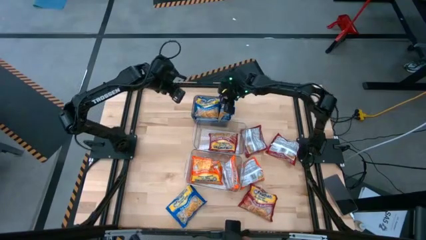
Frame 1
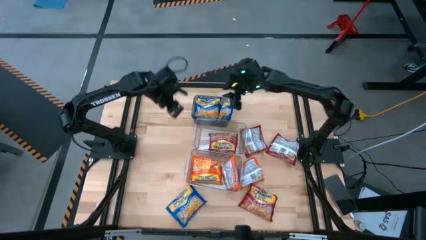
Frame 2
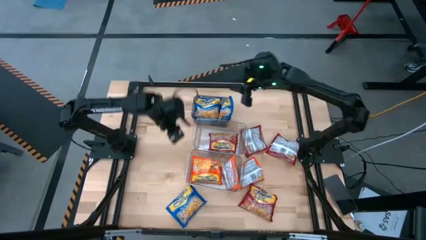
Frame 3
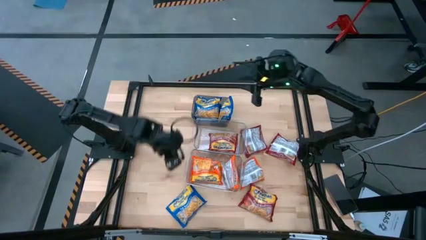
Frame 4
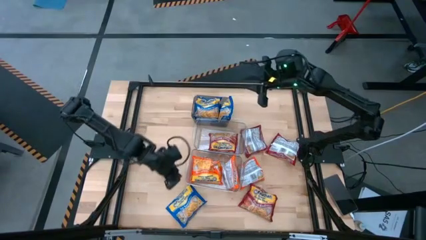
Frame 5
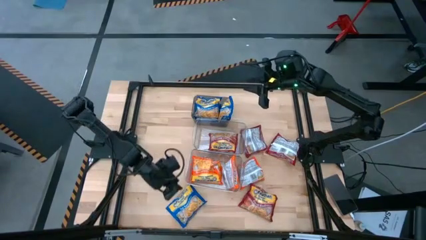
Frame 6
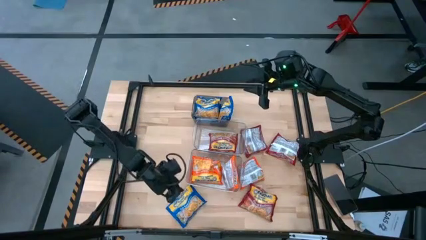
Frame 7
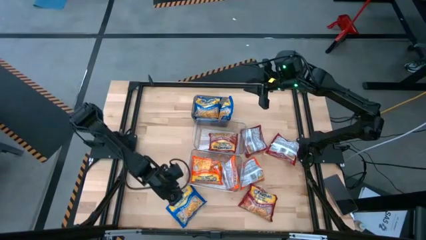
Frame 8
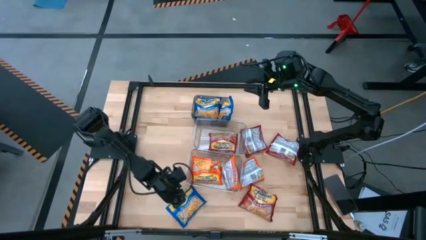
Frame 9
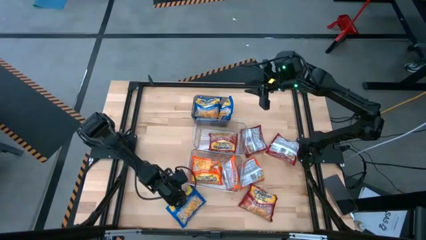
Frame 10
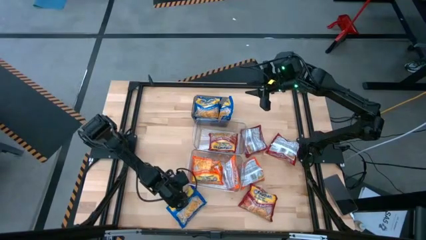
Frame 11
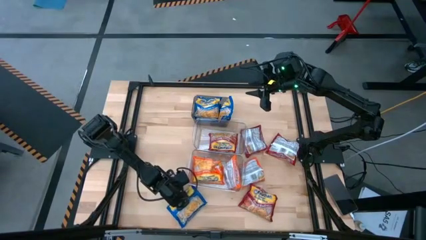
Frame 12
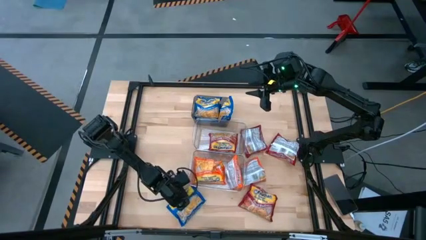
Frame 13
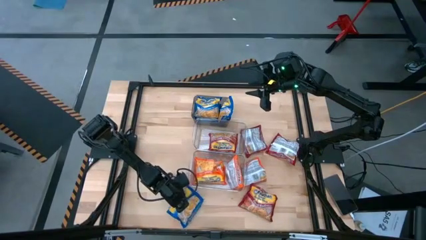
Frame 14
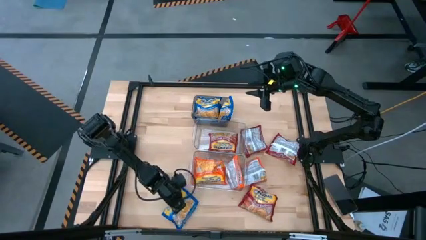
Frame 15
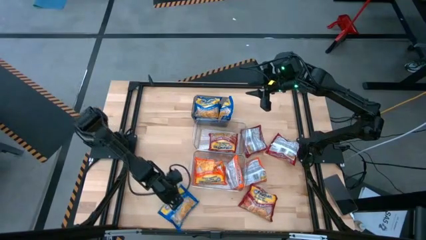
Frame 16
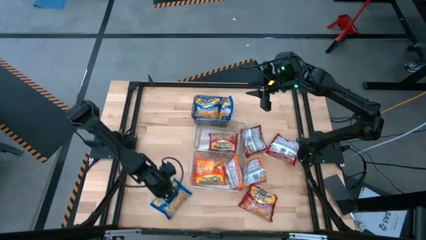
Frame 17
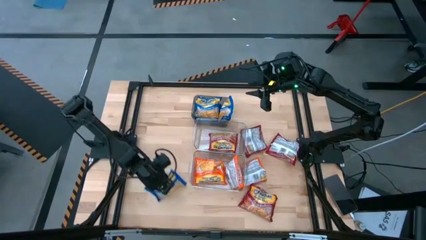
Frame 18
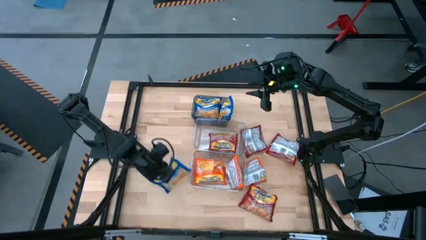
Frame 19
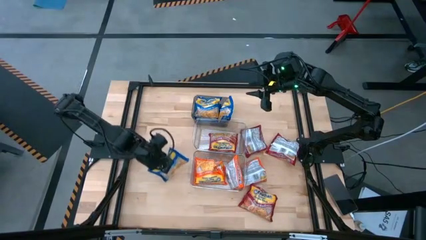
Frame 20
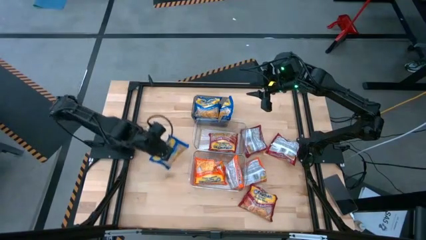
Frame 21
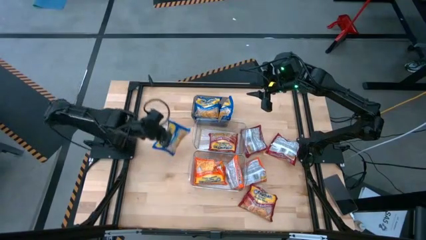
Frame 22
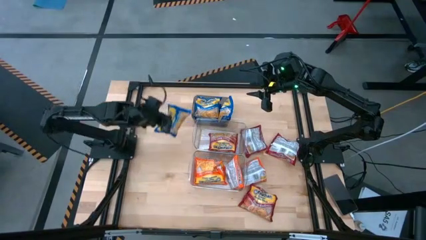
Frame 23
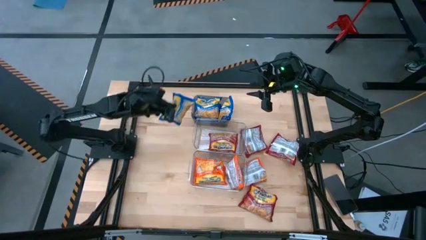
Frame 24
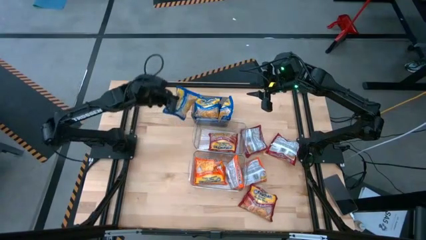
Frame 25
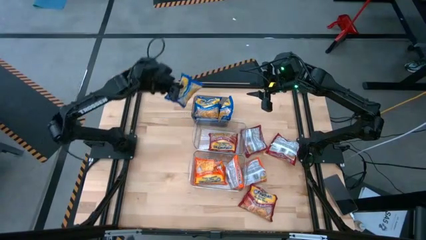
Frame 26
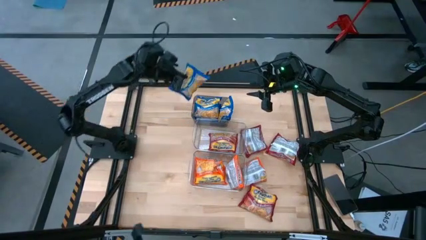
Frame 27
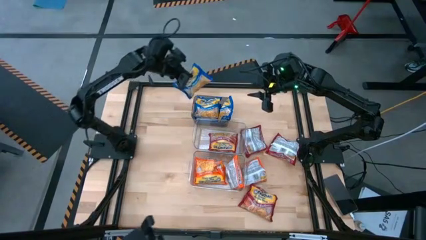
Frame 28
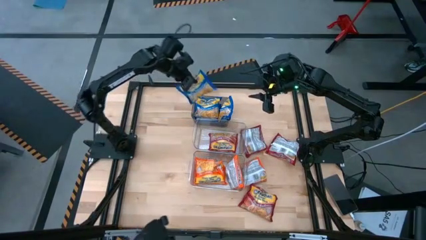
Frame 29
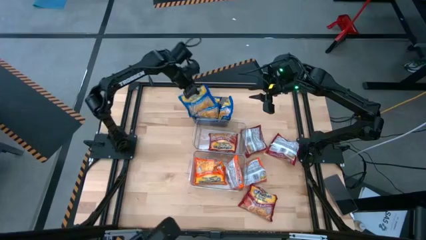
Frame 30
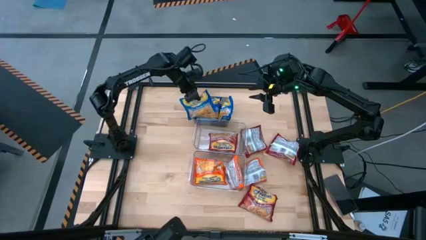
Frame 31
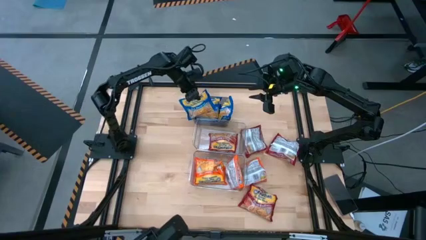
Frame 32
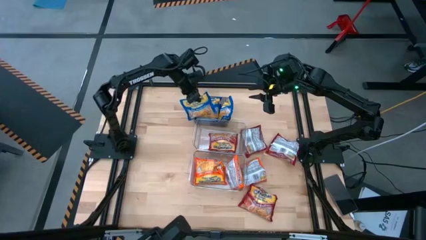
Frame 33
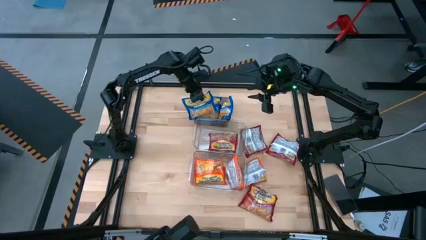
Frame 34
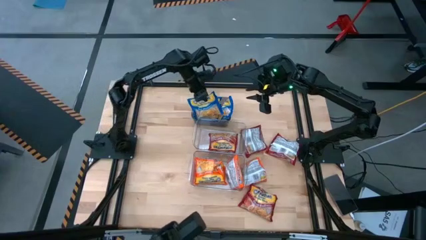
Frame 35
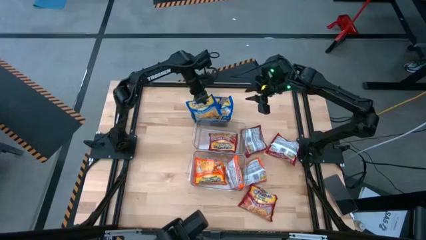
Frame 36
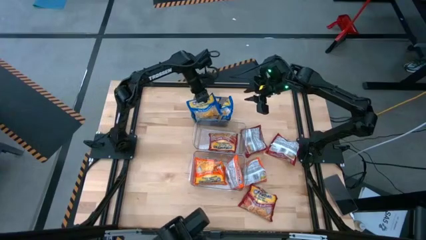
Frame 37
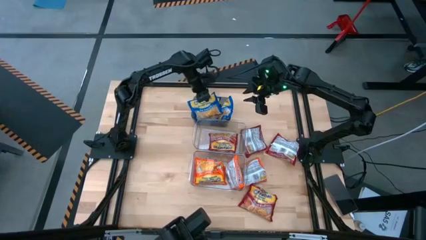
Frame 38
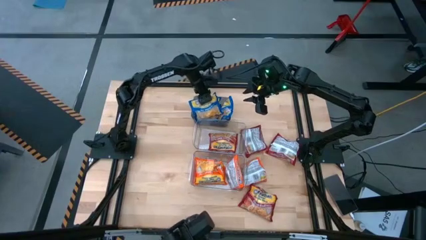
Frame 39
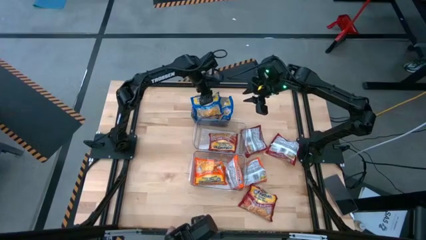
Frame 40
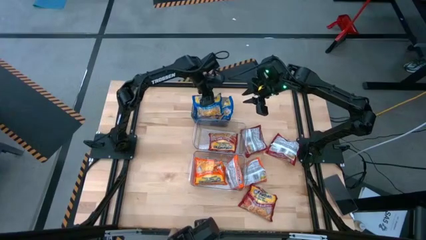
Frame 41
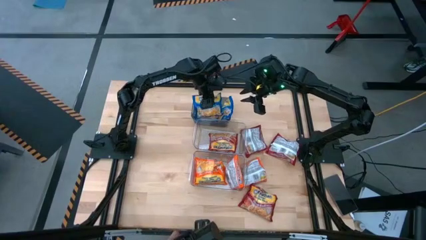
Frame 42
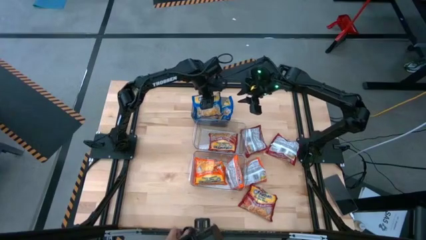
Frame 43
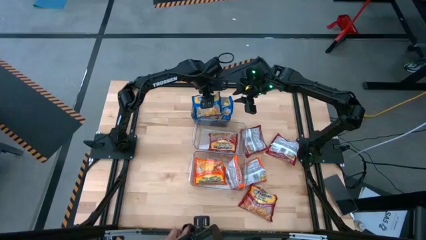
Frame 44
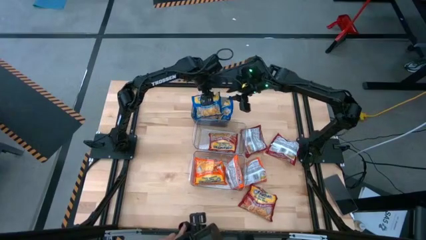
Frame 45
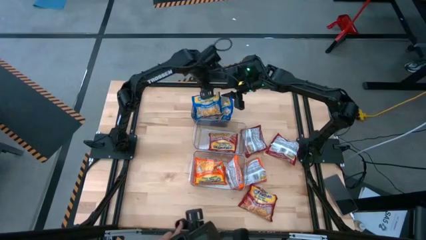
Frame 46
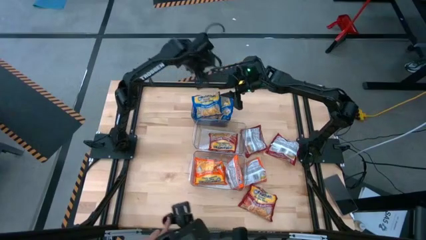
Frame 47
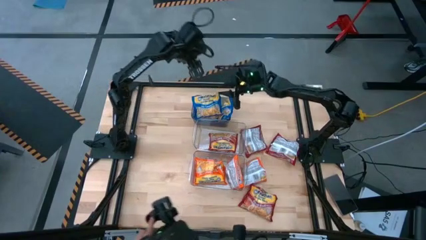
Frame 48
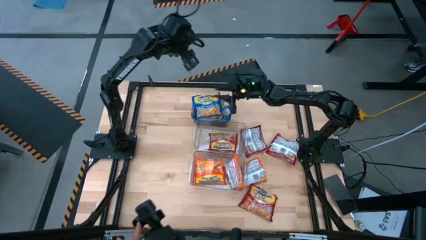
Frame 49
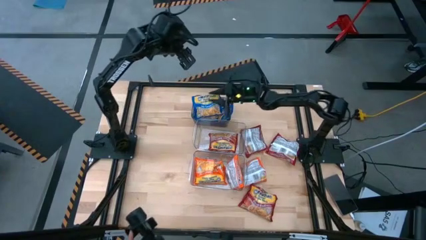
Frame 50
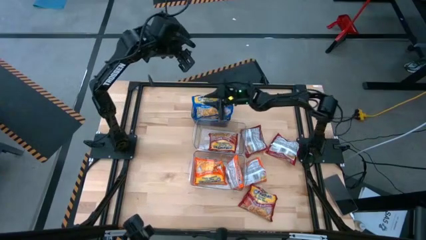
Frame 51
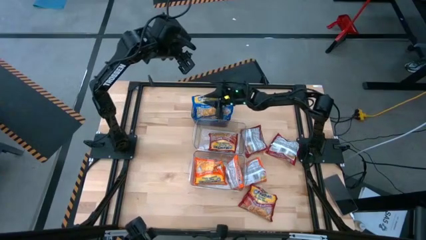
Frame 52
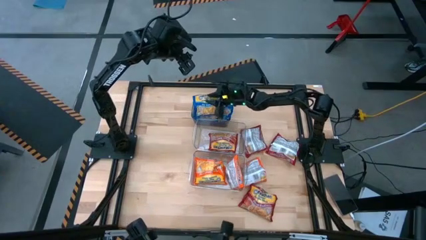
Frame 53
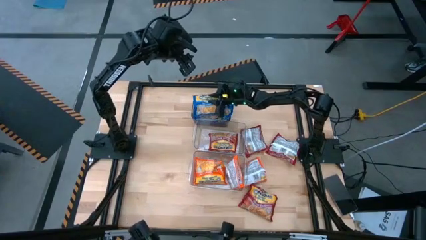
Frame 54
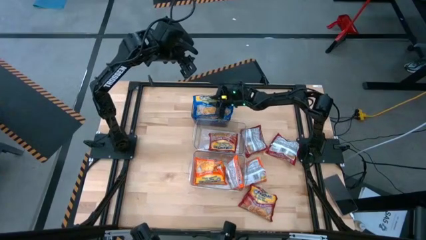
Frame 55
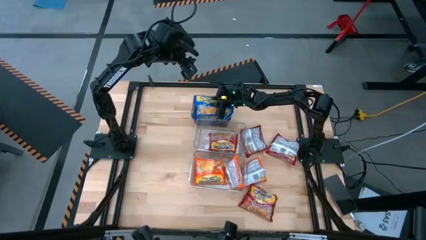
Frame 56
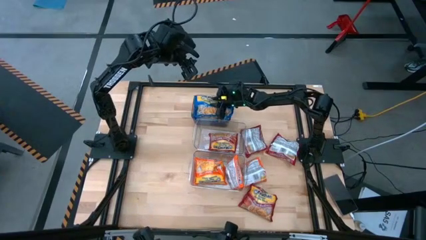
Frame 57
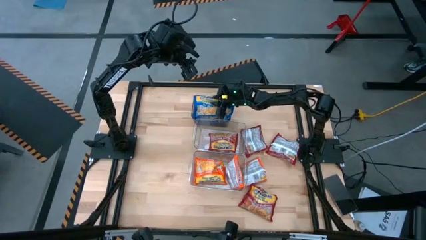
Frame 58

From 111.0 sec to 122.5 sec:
Task: Sort Maruchan noodles
Put the blue noodle pack into the black bin
